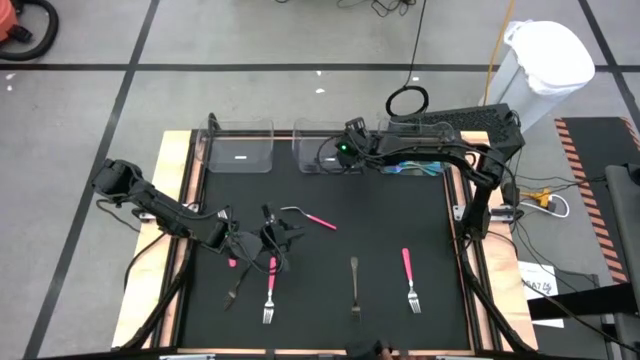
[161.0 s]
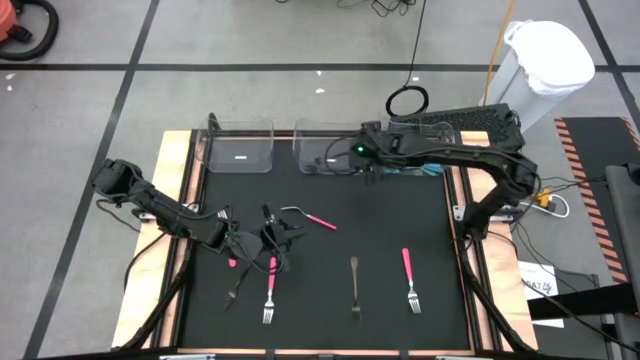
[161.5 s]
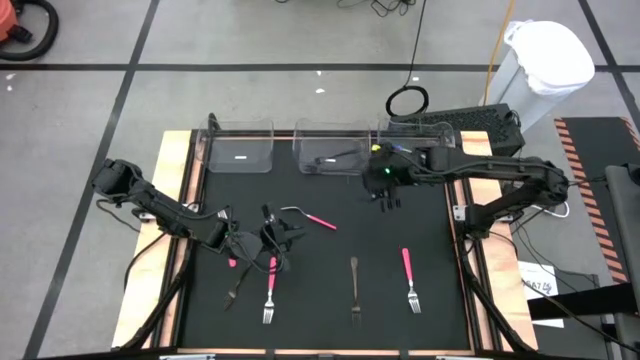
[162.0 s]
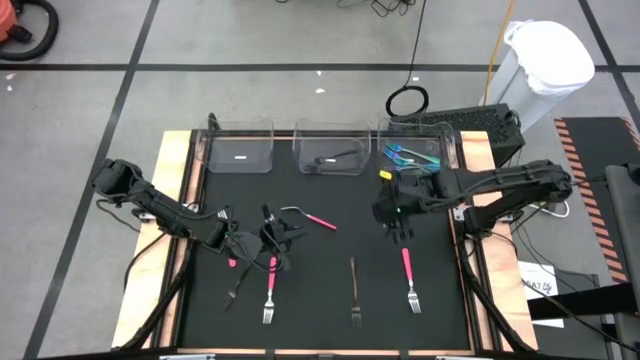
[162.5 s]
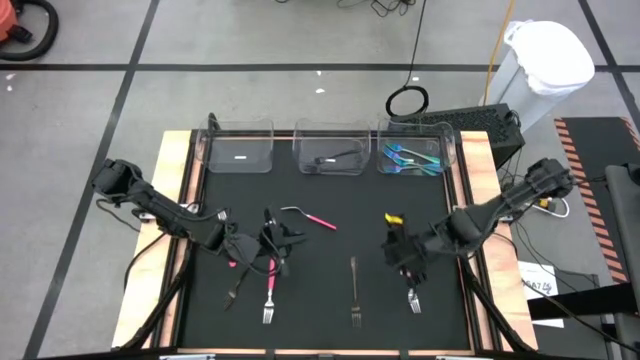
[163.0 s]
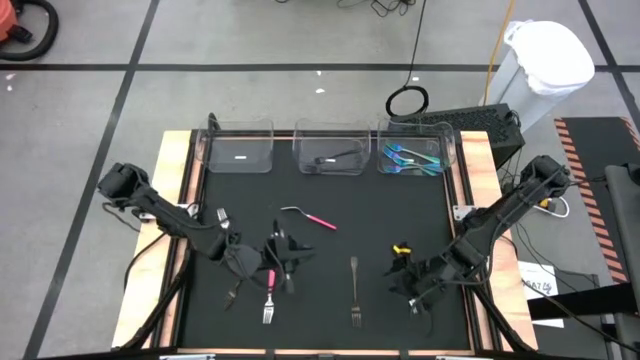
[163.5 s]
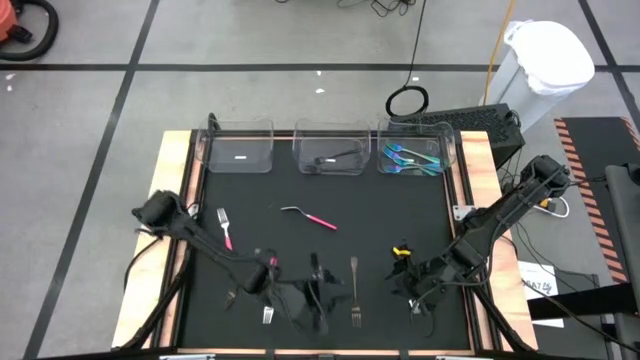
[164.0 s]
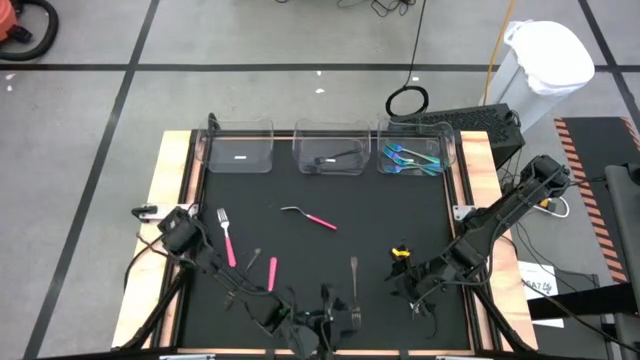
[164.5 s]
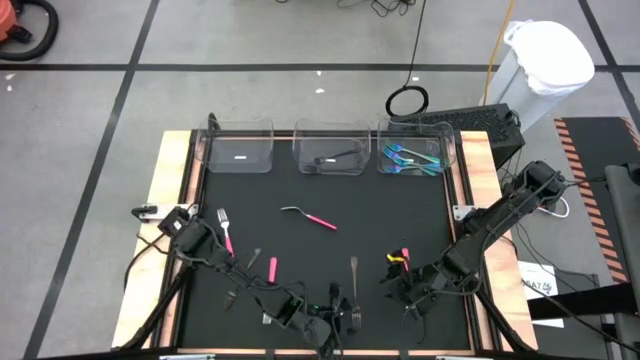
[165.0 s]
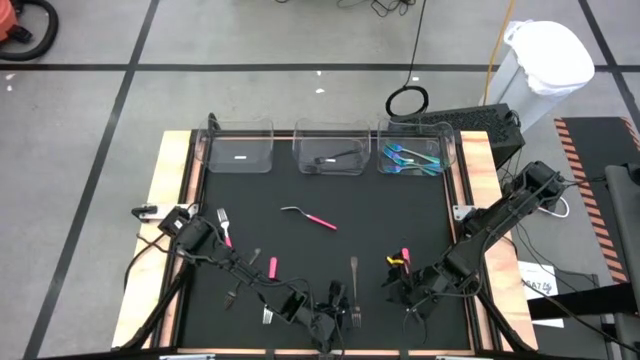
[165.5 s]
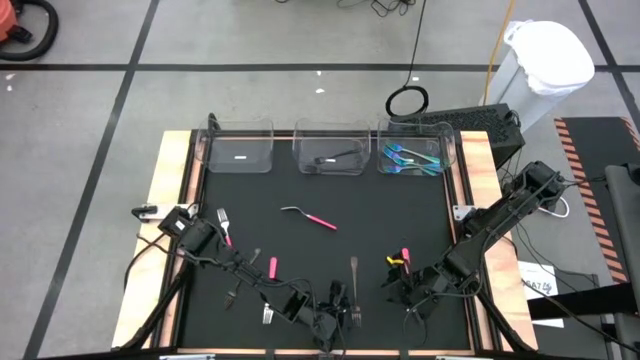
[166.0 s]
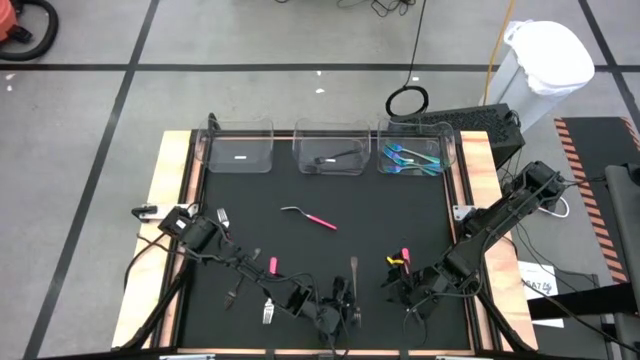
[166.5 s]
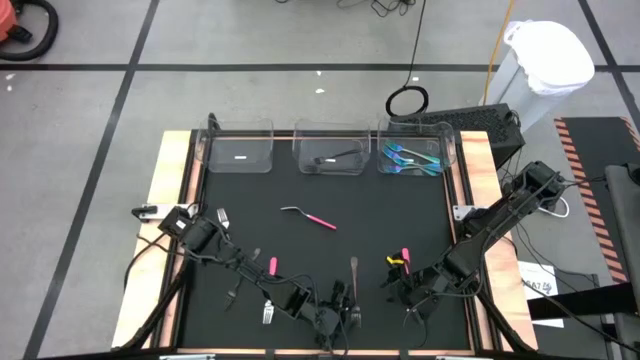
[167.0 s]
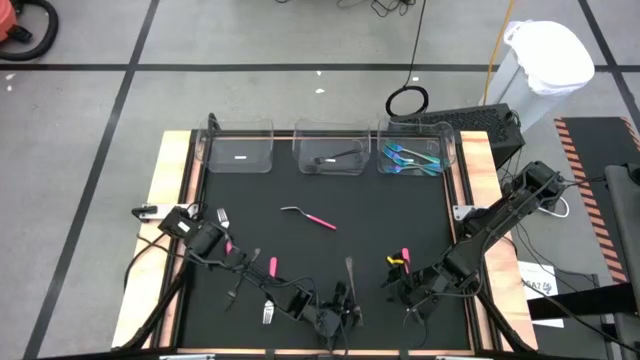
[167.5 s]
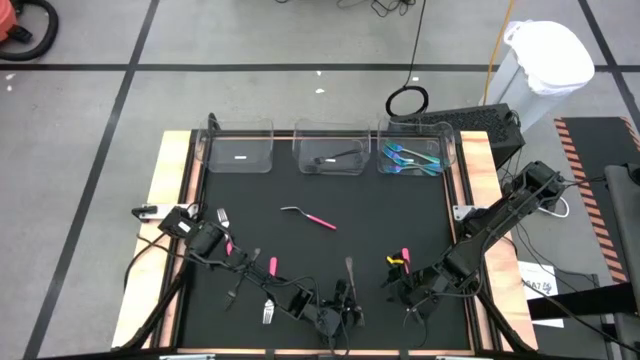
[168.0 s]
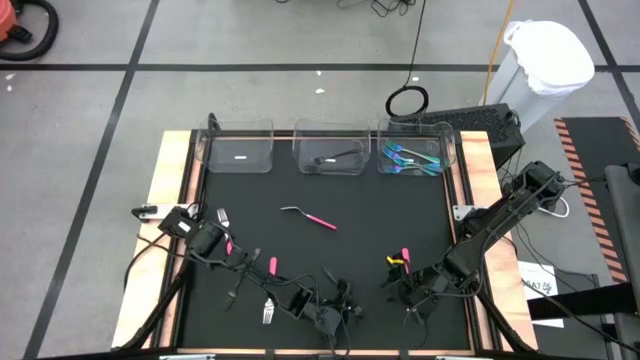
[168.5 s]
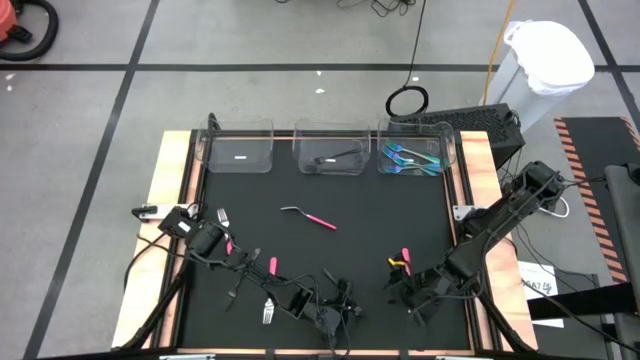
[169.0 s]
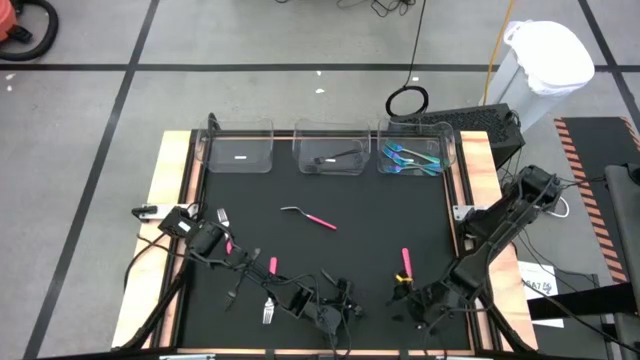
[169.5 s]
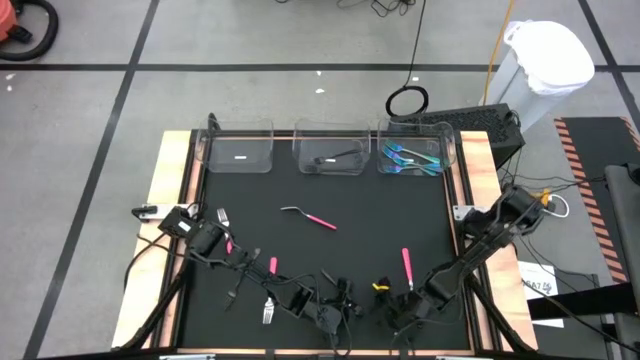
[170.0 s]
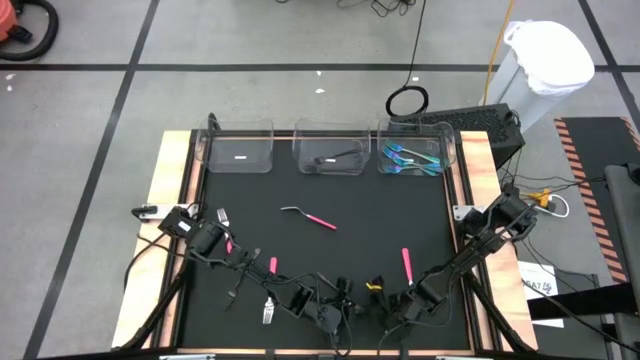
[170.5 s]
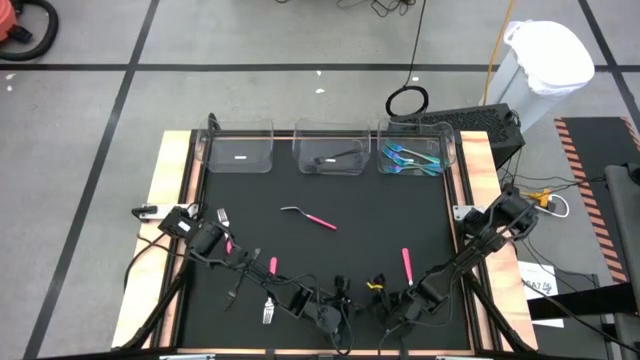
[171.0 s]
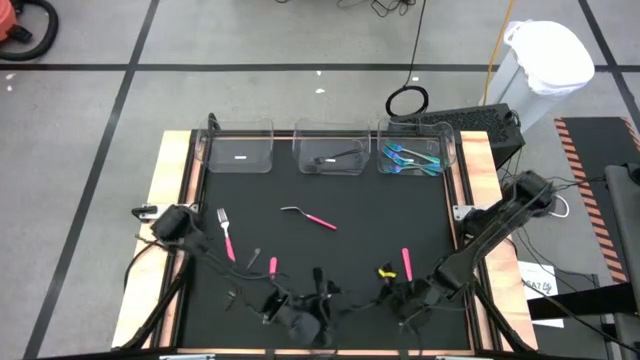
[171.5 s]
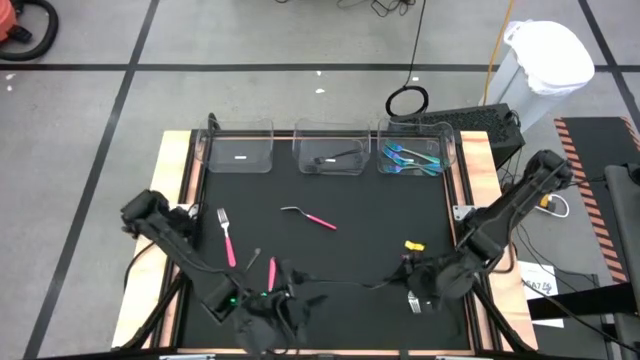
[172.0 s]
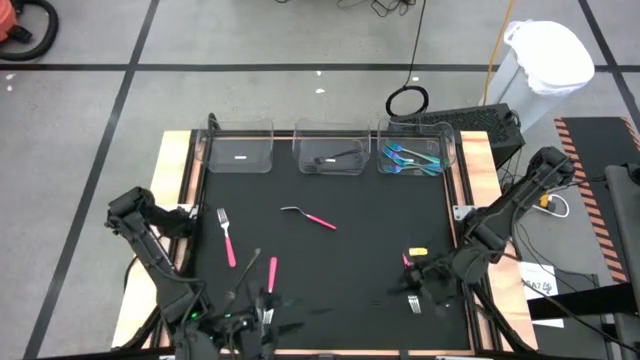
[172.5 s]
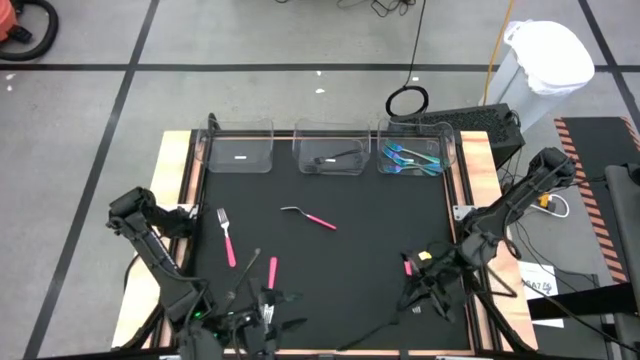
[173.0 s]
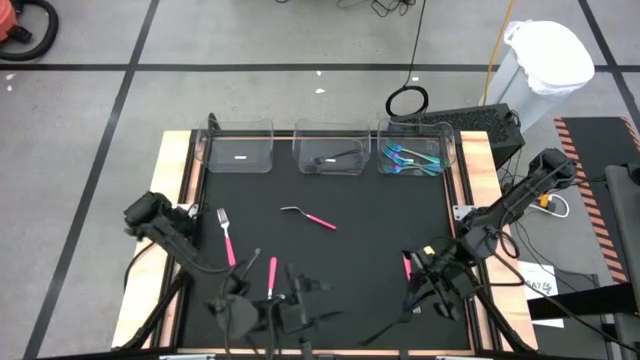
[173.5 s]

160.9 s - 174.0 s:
Task: Sort silverware by color (type)
Put the black fork into the middle transparent bin

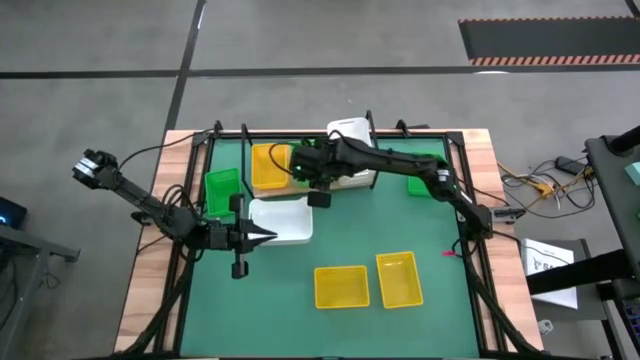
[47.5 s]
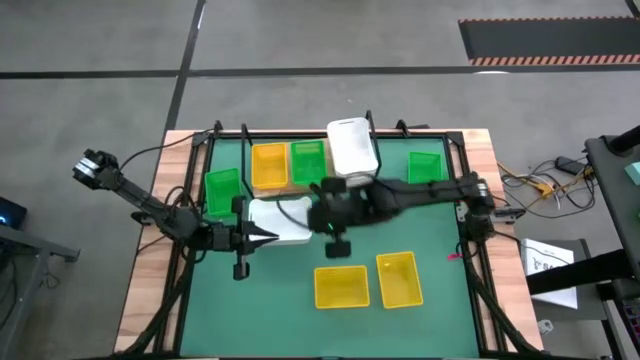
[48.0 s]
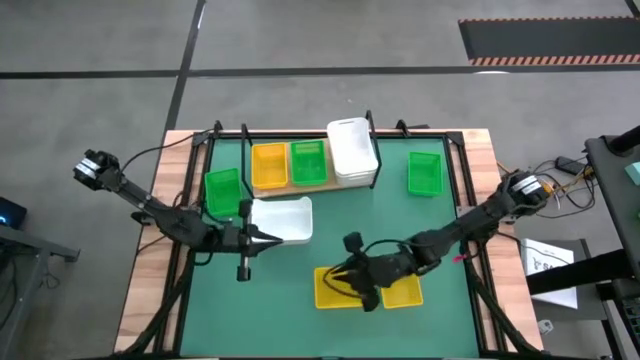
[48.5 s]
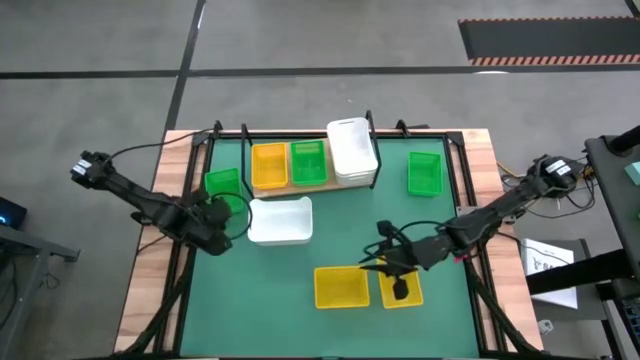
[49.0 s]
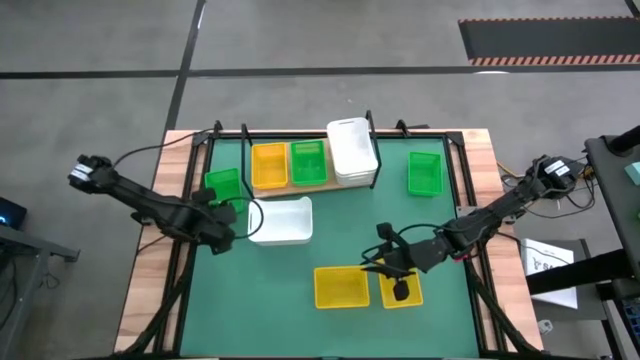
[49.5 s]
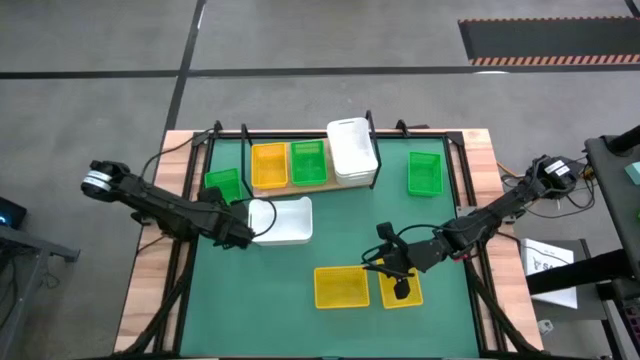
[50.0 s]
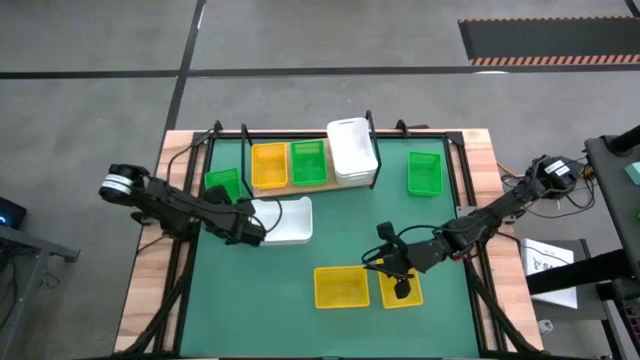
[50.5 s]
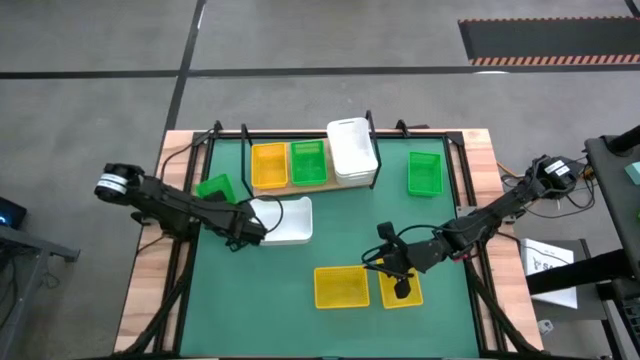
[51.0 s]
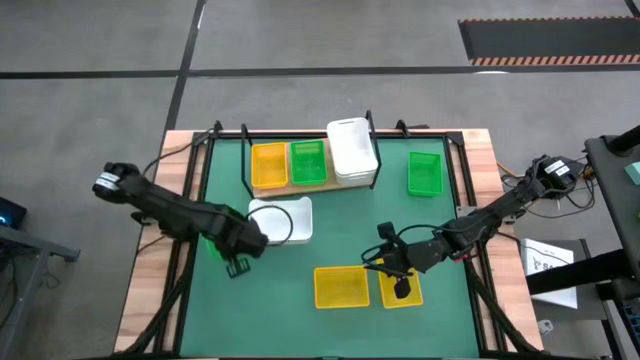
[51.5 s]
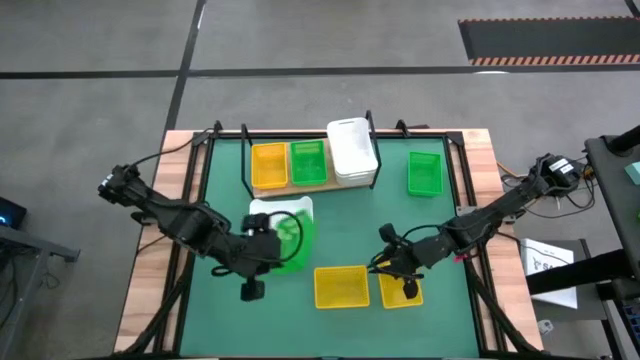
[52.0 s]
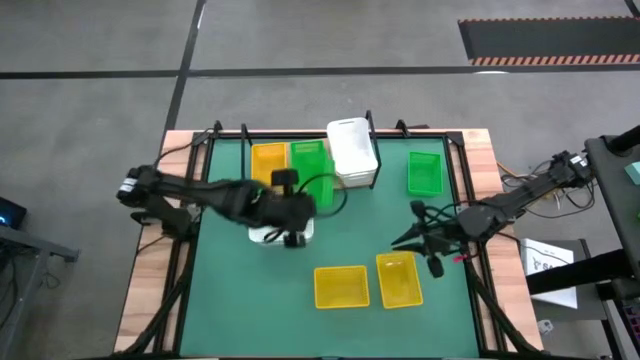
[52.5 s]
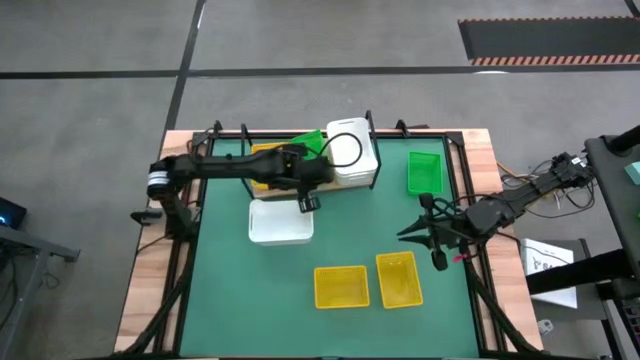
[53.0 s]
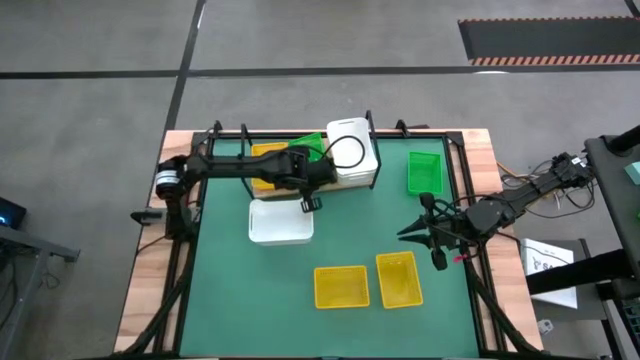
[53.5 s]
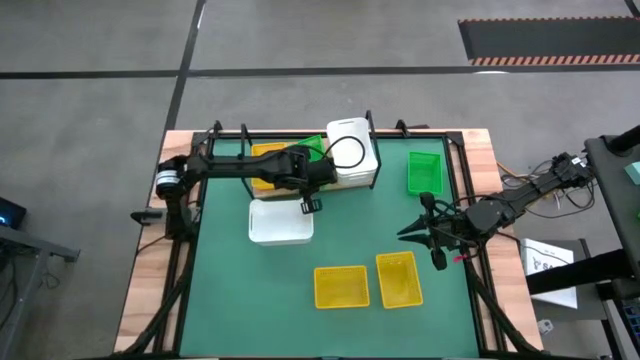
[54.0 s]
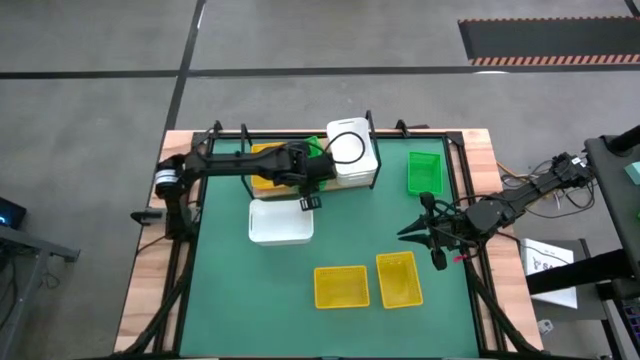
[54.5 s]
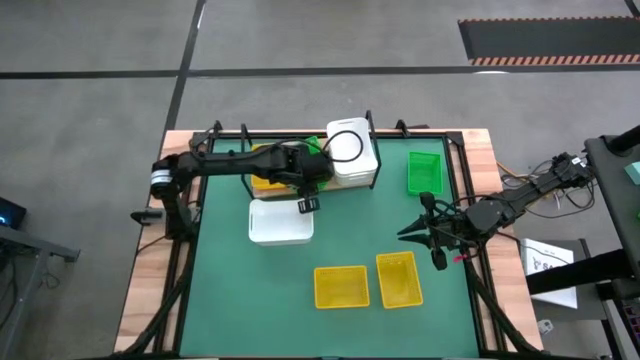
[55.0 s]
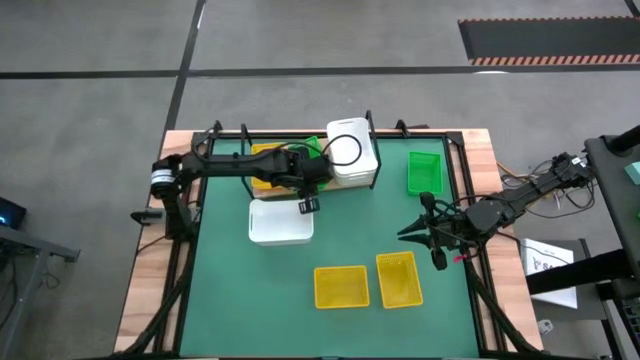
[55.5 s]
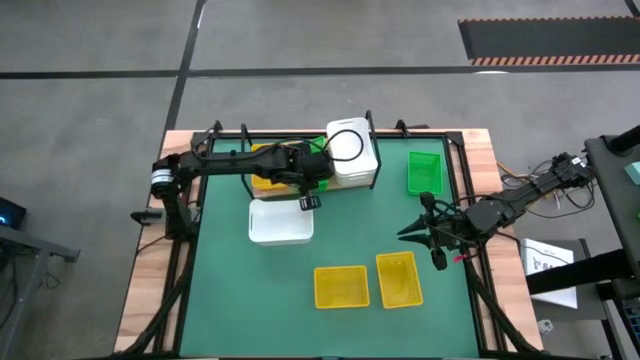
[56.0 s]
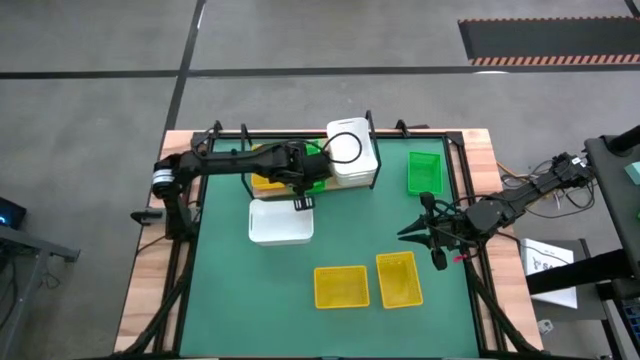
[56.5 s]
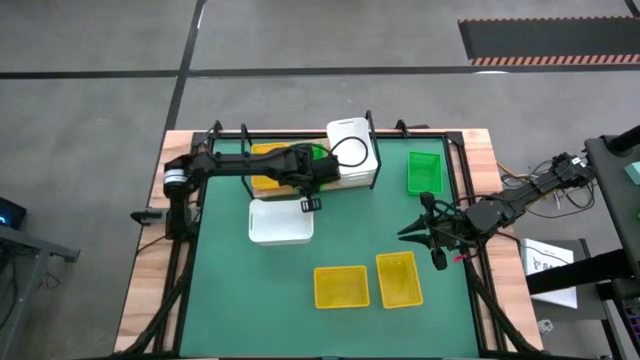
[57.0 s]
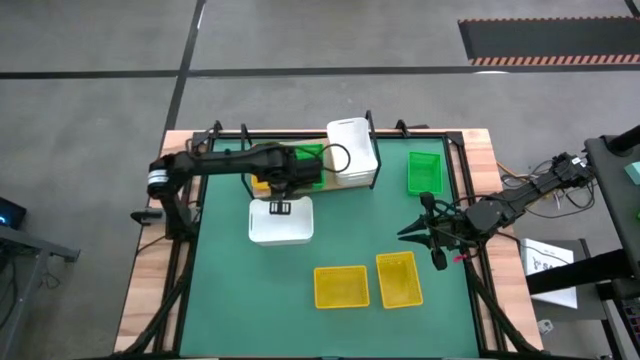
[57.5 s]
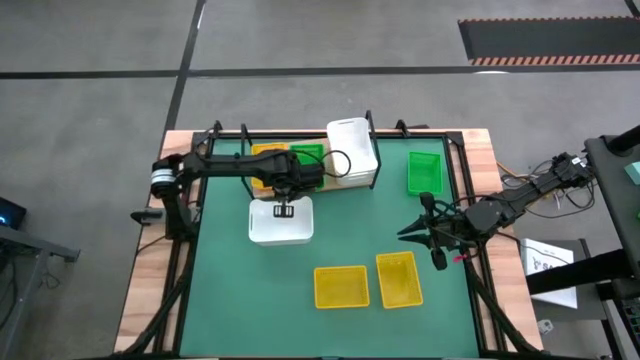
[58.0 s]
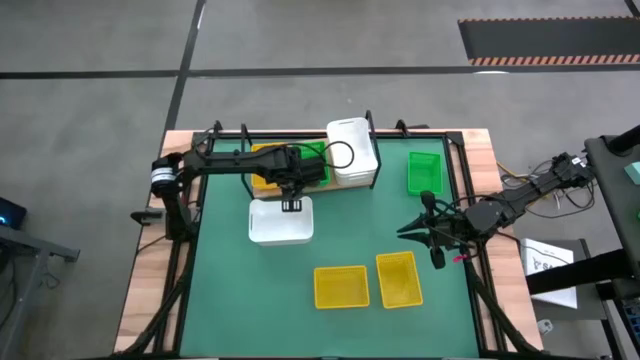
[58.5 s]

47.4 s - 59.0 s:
Task: Stack baskets on shelf by color
Stack the left green bin on the green bin on the shelf
